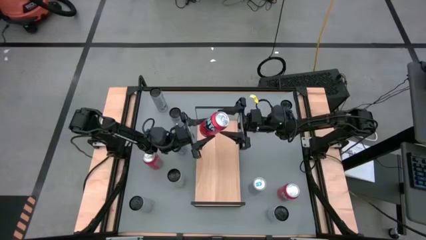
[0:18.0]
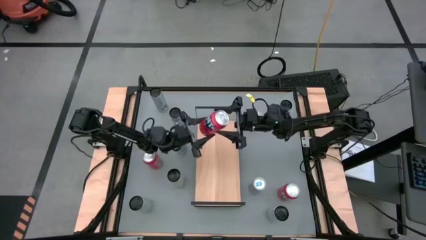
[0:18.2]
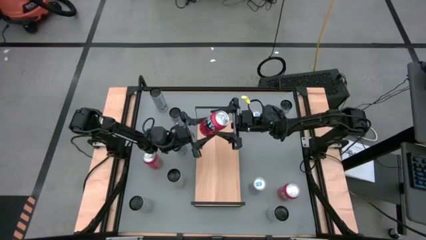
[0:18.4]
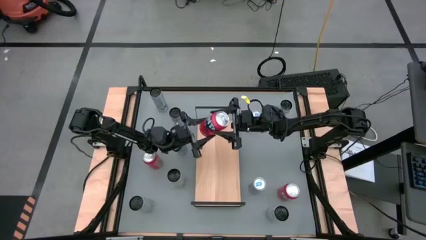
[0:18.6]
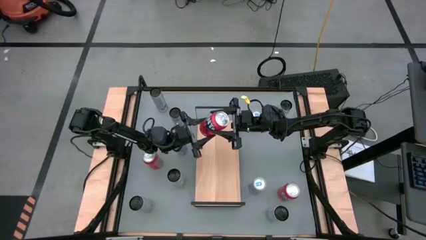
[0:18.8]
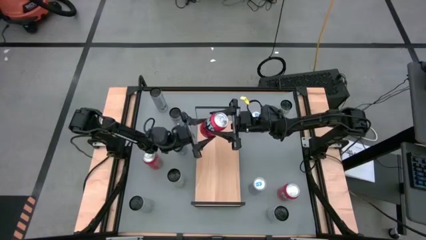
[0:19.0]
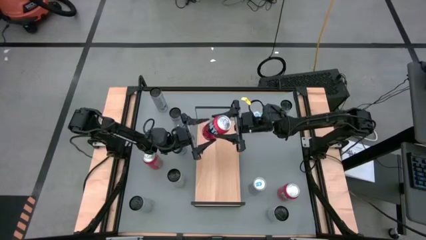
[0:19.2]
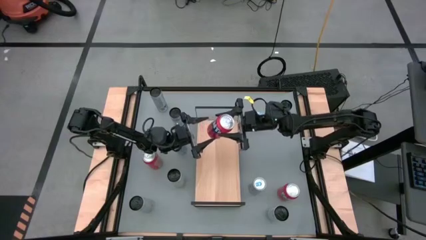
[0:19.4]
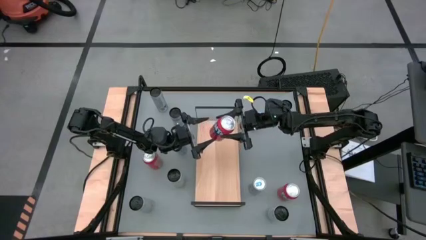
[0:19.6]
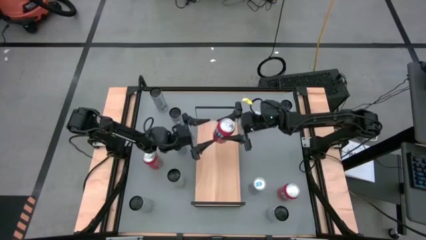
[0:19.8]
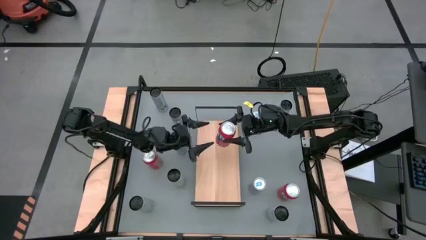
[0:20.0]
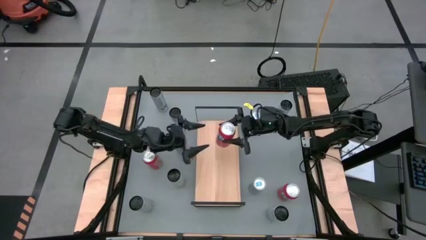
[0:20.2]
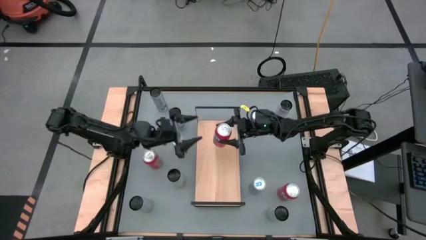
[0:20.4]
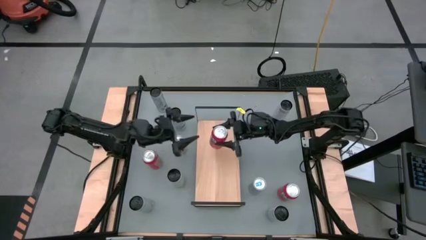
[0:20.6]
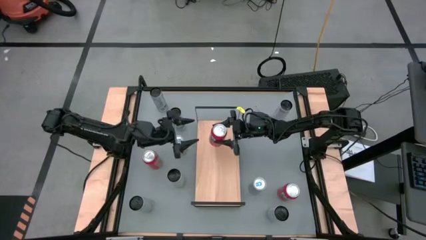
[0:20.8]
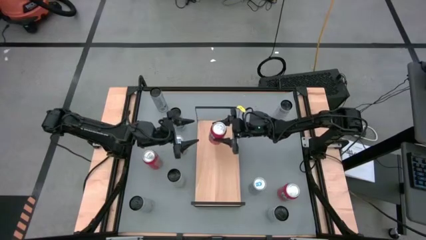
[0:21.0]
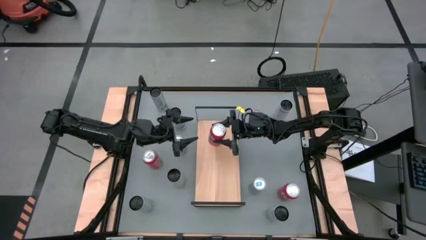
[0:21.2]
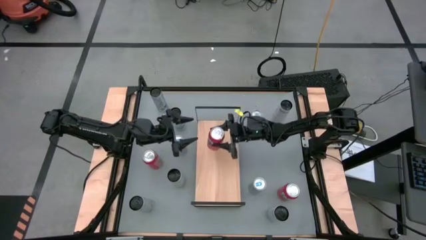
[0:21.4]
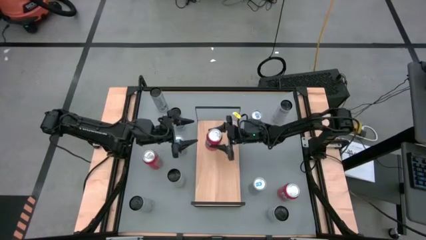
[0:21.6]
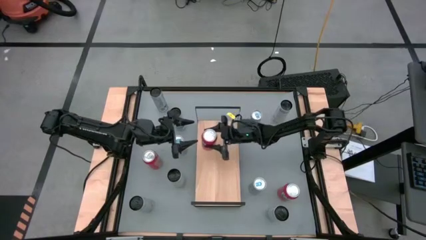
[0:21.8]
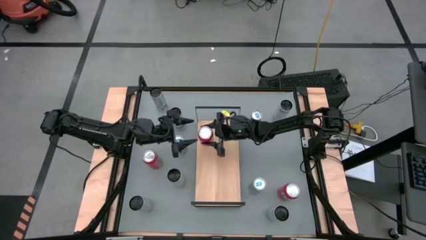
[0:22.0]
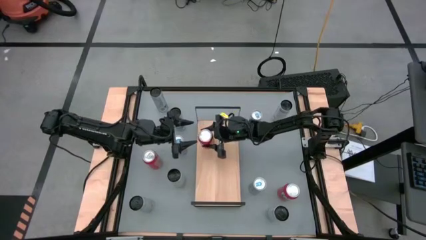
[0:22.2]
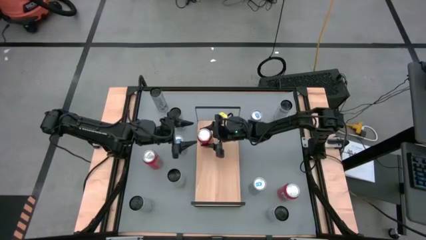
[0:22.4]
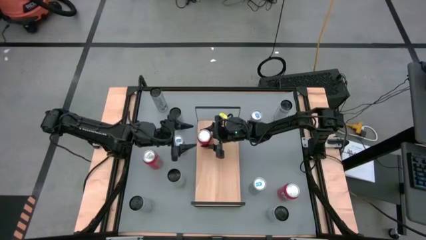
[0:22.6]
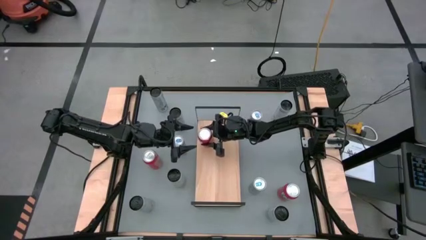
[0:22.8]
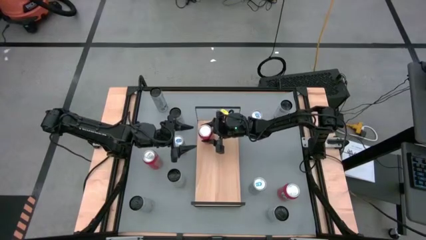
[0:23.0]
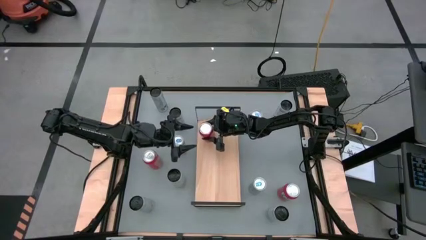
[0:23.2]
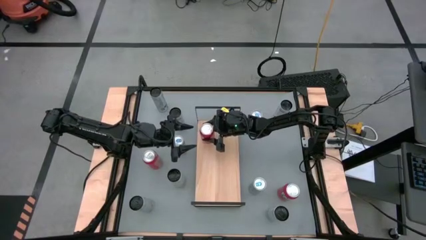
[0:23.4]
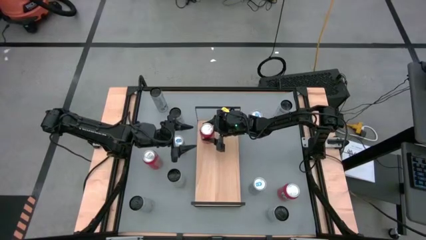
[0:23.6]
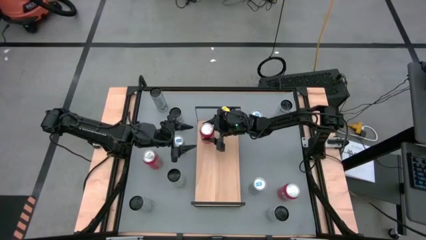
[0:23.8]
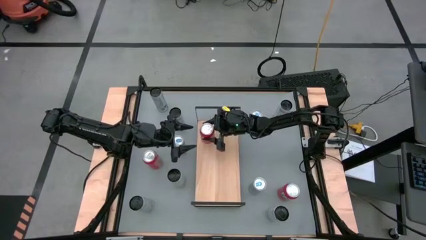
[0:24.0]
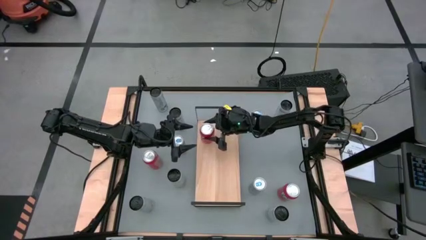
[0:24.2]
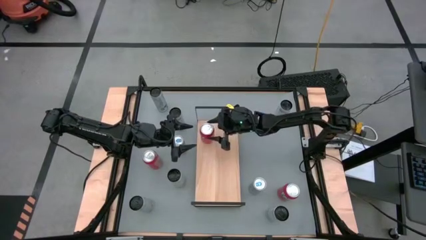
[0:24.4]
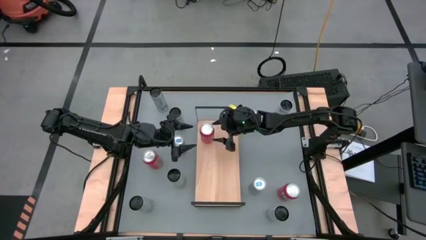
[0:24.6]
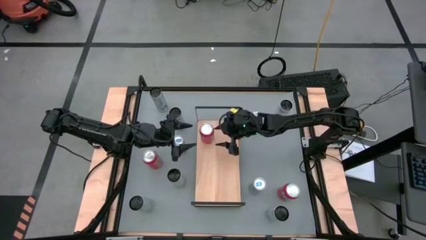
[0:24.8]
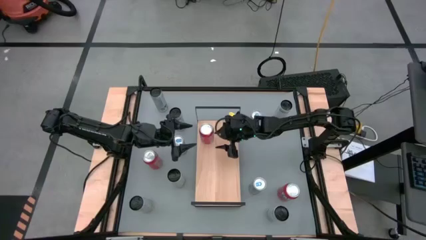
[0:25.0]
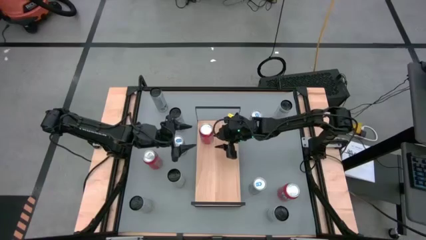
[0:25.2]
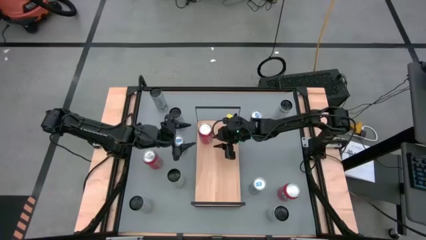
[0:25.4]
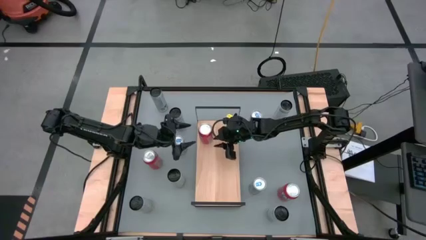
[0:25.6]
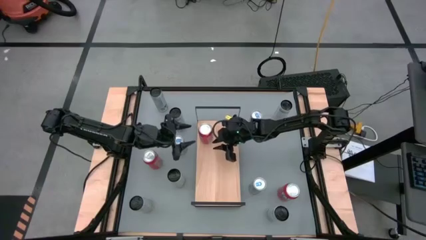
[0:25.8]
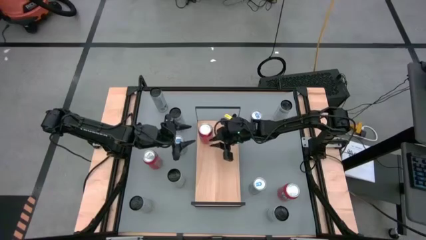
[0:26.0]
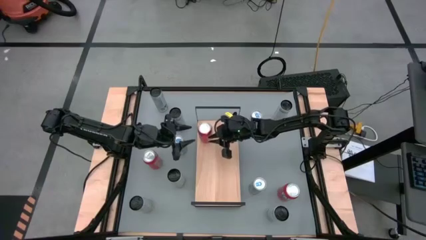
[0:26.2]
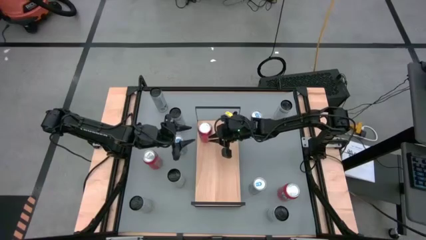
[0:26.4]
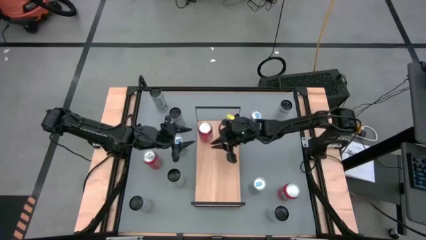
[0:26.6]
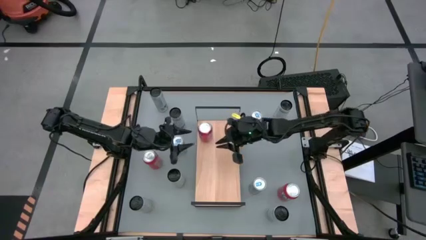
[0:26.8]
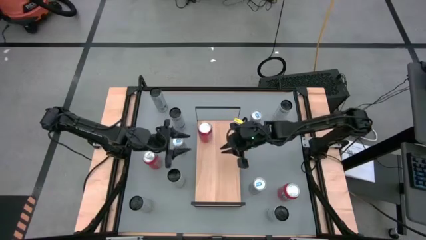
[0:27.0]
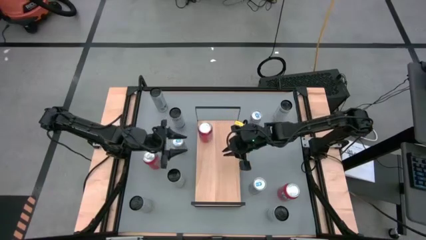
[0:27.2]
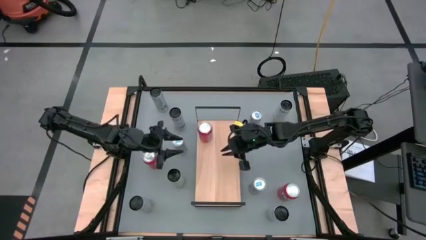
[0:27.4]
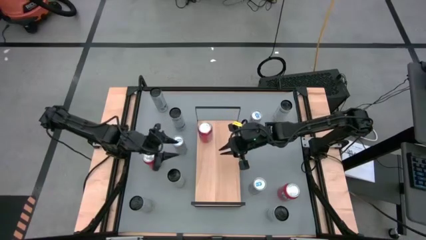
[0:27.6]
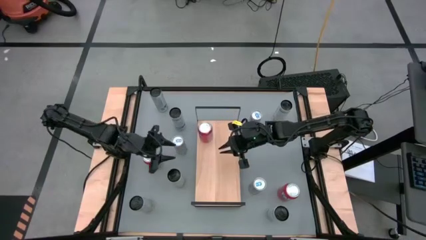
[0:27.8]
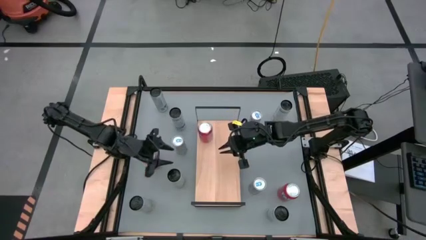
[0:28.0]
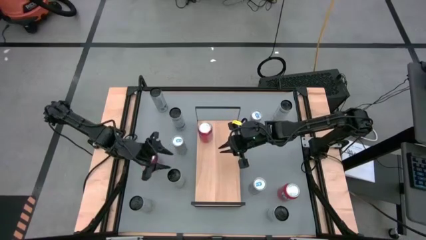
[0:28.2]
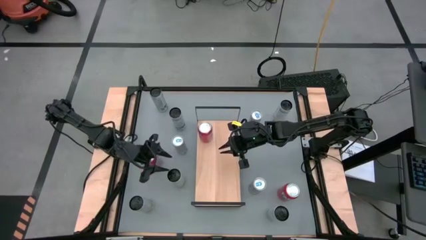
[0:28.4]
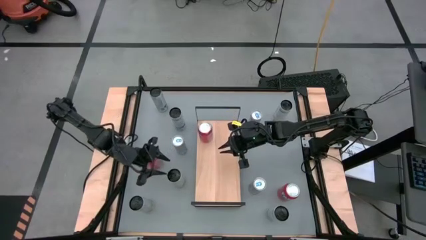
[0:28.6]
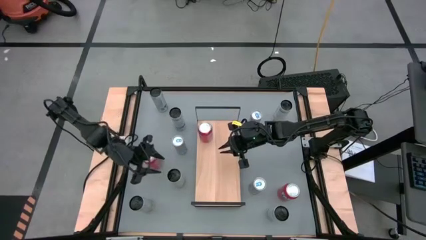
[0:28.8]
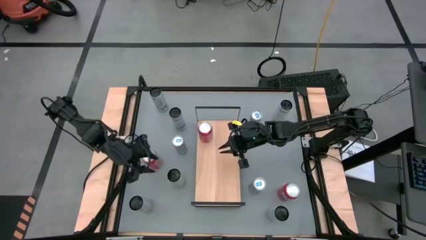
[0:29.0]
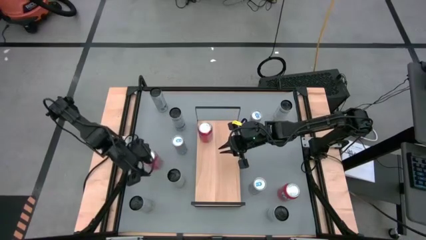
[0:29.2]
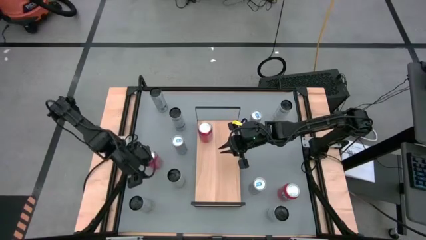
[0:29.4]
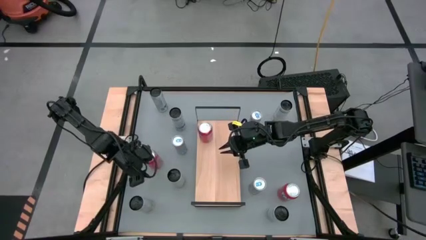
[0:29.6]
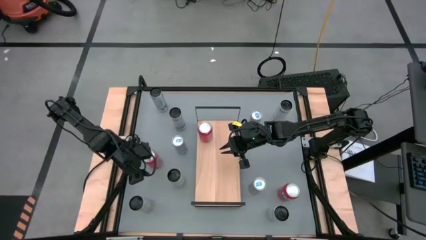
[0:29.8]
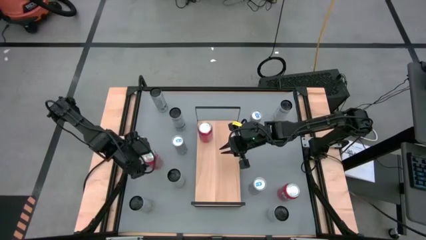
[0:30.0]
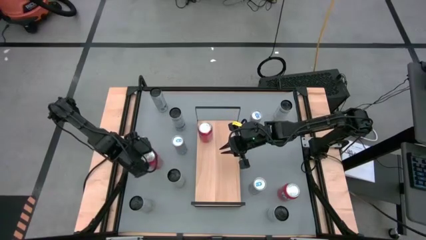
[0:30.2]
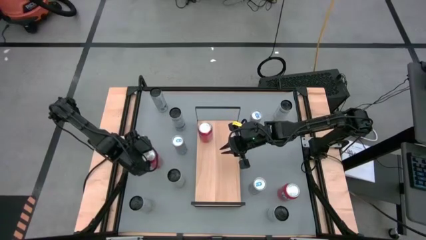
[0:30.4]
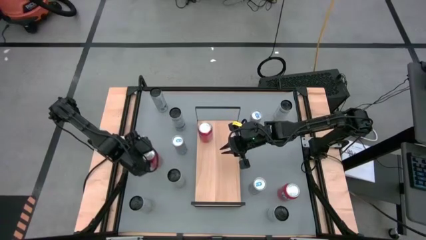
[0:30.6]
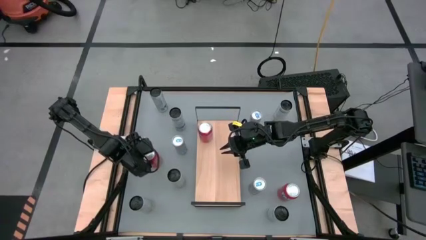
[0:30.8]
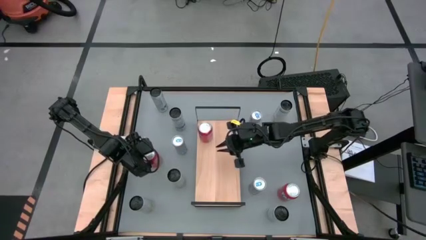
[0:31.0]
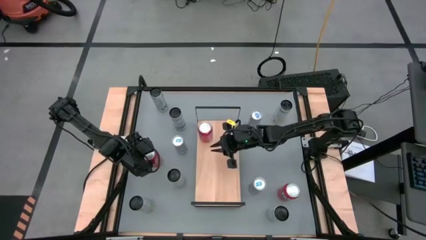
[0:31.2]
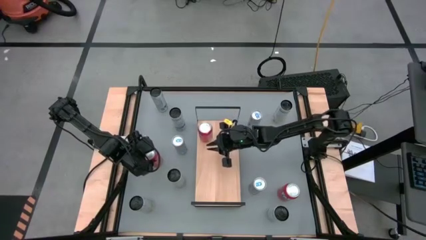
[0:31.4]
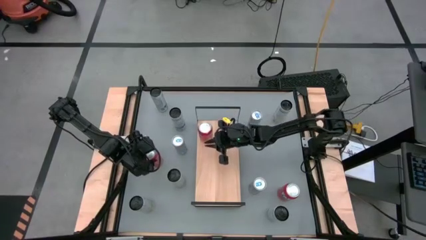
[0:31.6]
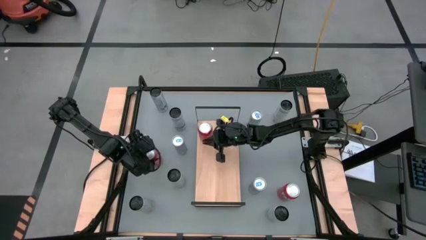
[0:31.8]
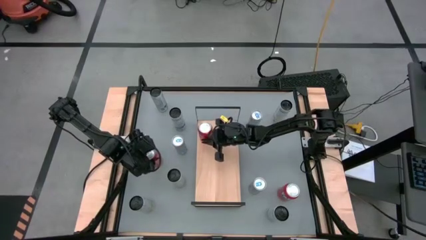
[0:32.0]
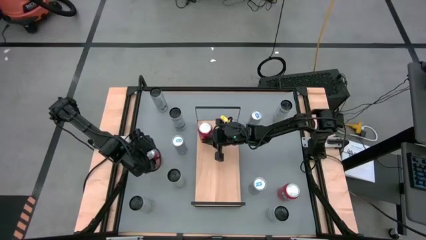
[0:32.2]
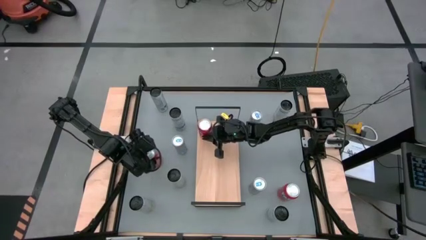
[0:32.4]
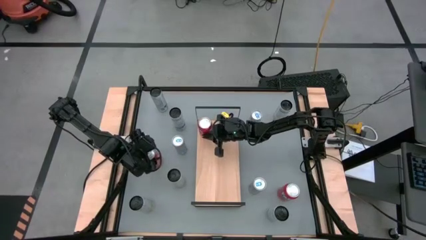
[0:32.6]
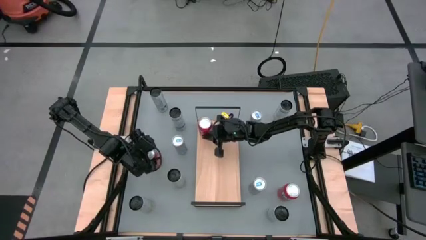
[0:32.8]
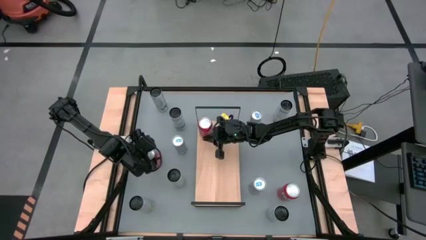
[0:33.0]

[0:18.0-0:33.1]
Task: Place canned beverage on shelf
Put the right red soda can on the shelf
